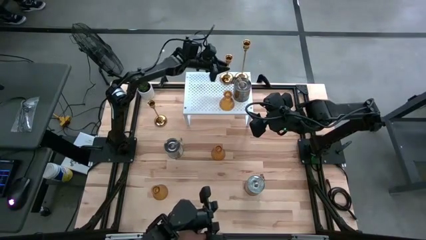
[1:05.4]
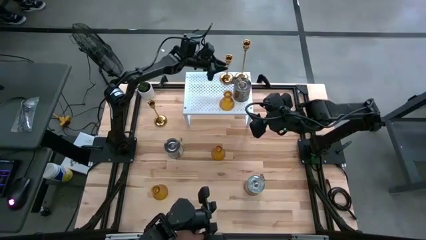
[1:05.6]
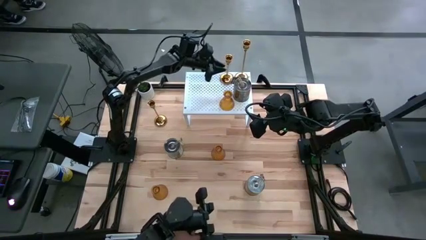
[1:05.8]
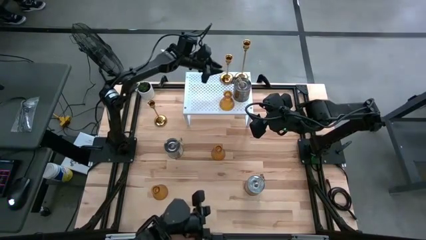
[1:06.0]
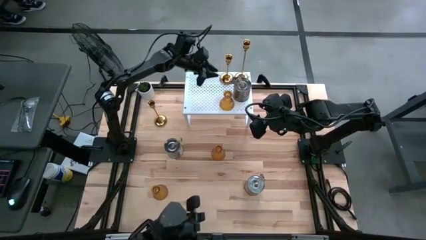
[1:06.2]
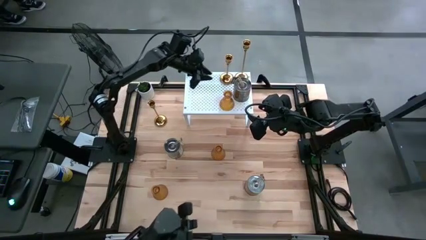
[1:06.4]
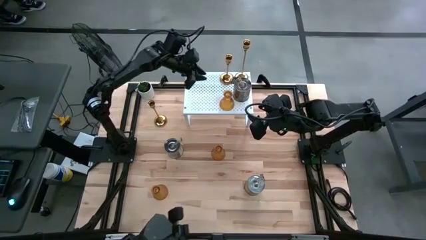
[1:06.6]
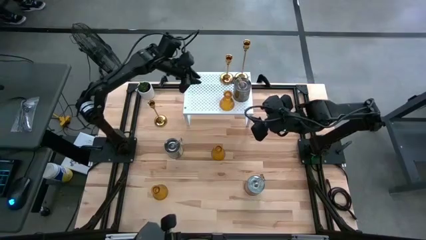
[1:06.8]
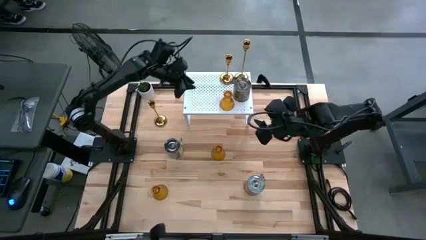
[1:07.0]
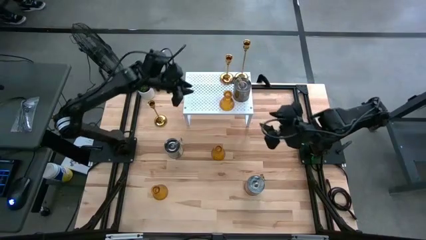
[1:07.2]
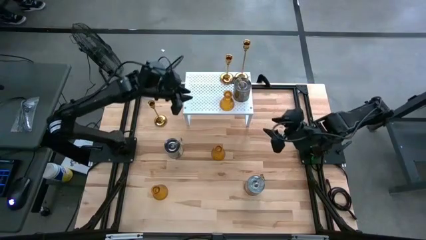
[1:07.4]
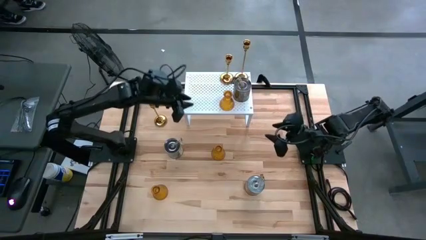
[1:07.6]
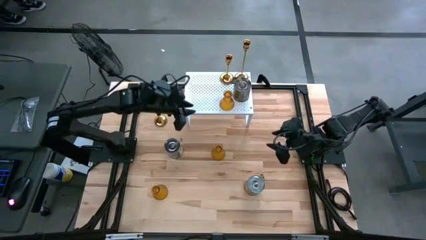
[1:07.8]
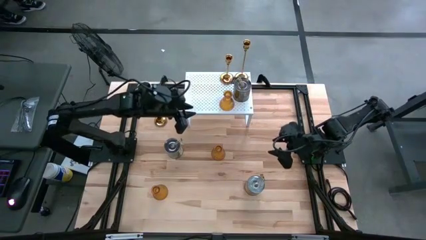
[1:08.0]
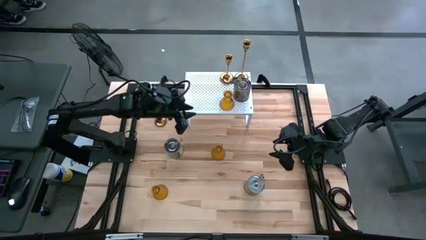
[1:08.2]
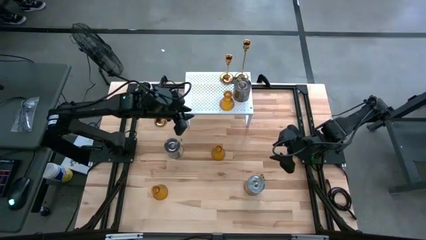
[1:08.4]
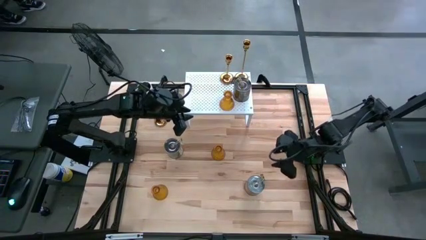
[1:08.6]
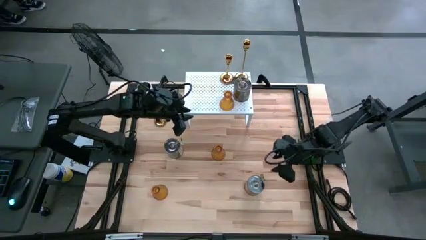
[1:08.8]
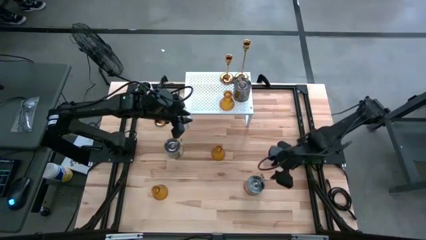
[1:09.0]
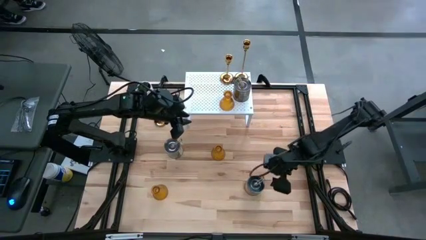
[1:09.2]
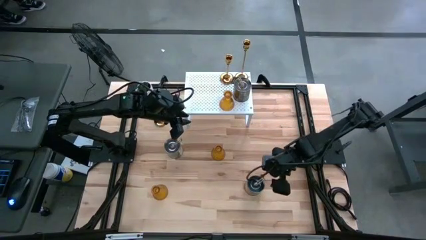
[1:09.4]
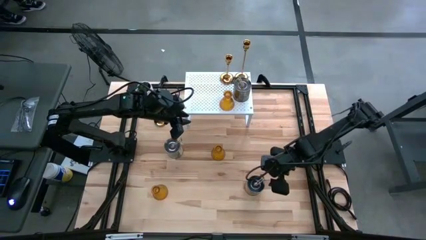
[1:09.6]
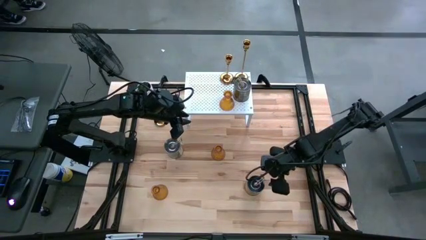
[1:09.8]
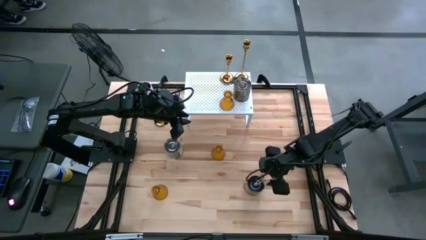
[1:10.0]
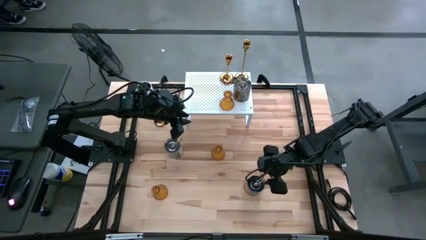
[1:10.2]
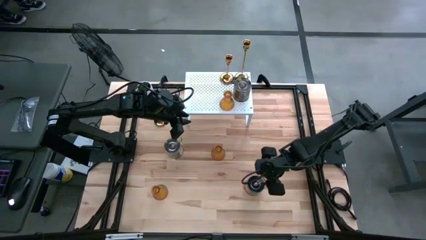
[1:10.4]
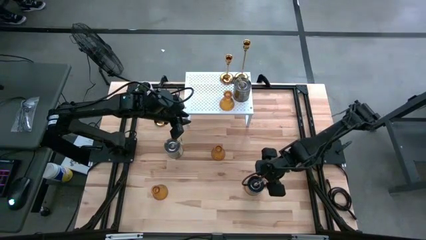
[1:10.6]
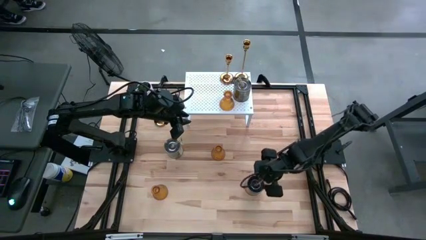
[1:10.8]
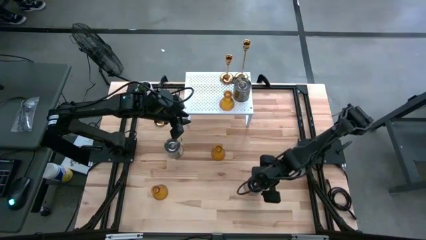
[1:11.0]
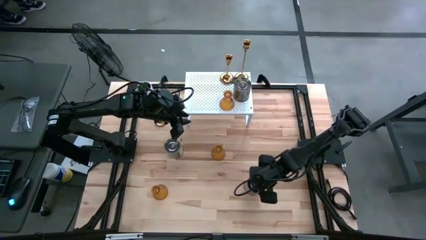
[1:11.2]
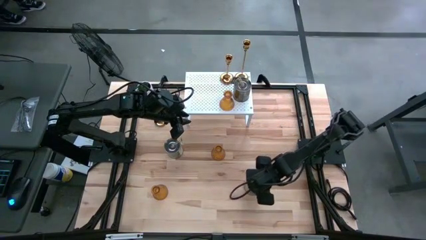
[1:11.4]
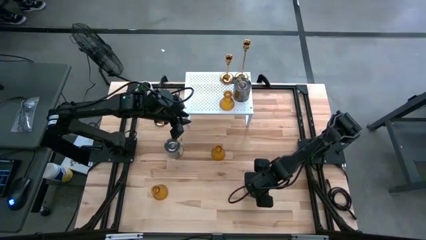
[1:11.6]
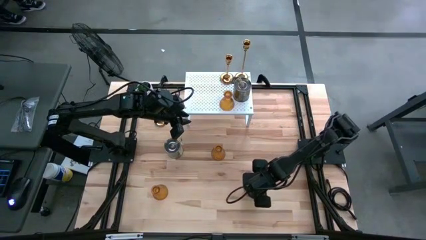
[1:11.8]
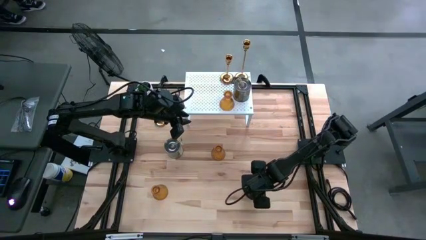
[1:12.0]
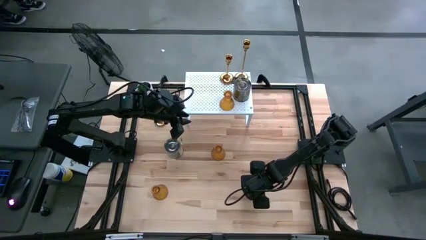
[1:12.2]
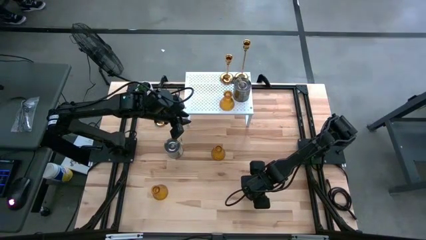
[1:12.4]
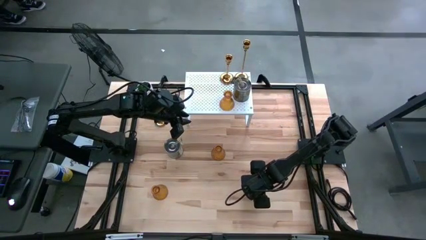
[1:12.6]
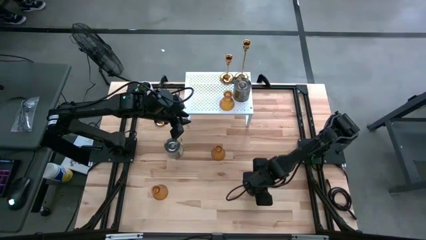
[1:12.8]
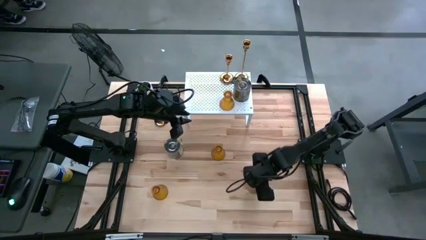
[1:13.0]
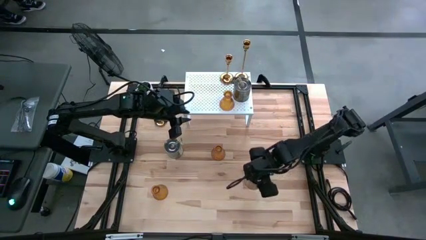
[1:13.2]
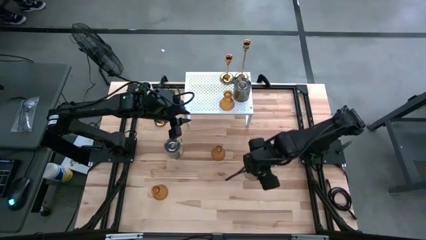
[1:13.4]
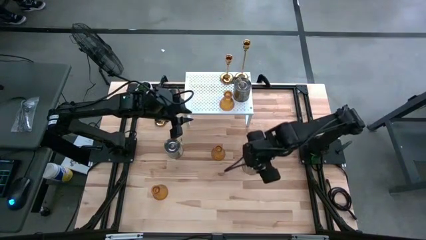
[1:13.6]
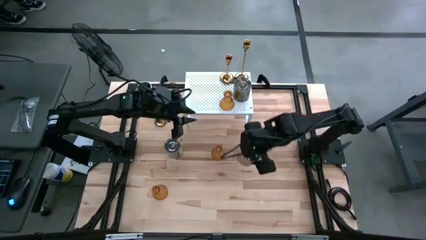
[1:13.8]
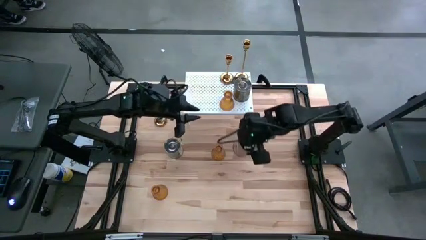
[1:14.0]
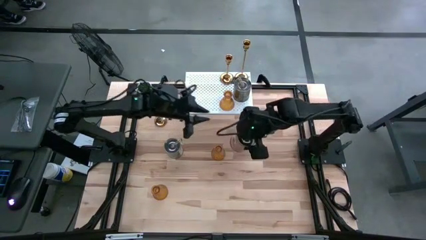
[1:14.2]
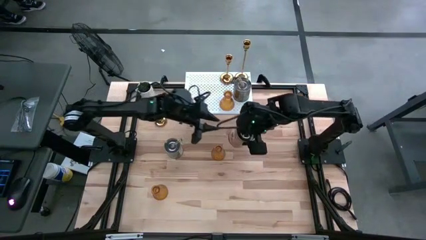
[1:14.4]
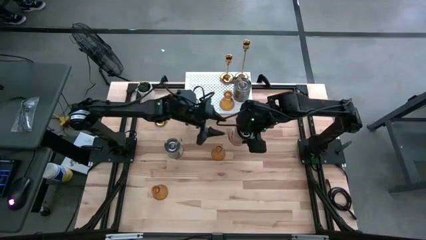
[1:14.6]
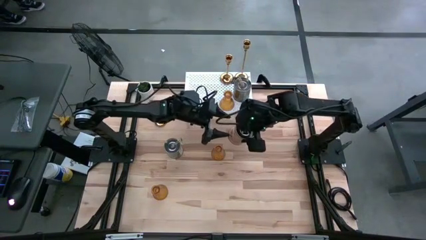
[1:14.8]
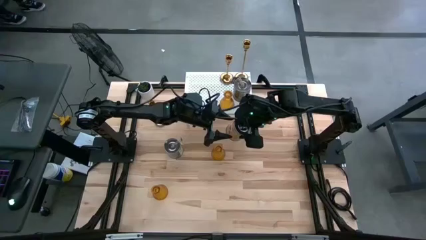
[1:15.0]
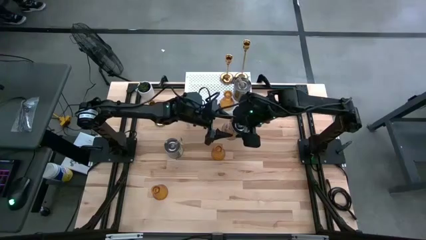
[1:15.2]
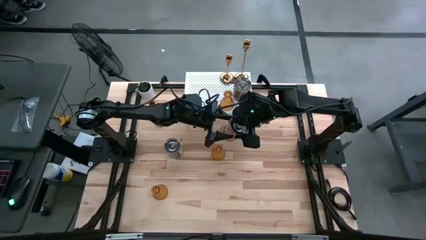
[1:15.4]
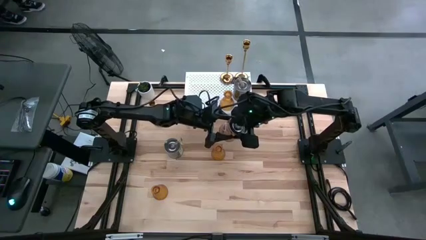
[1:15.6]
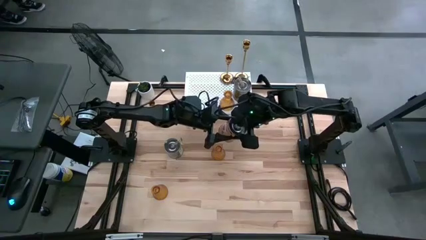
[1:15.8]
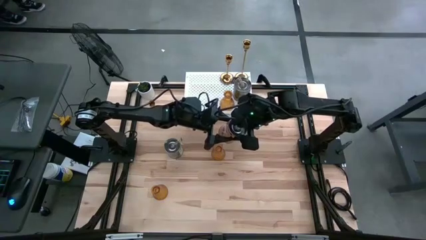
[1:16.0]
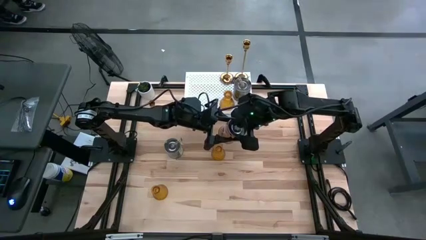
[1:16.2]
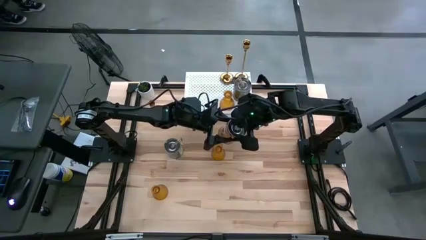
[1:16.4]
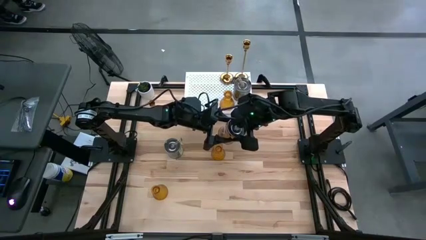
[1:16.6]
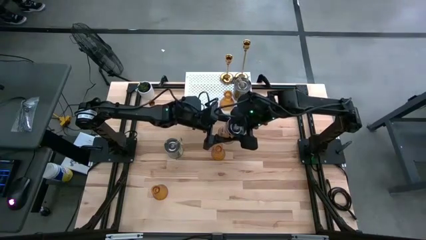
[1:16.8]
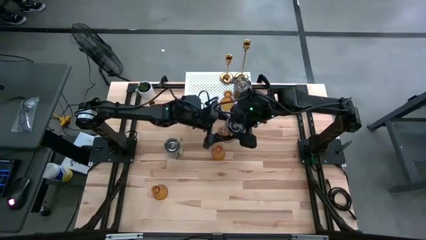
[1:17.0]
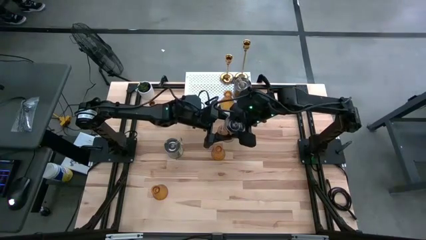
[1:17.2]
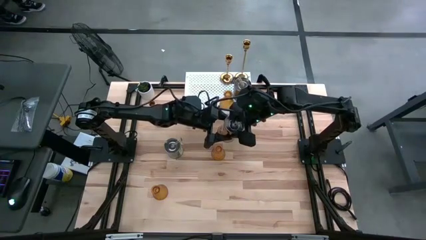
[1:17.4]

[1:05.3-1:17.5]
Task: Pick & Place candle stick holders
Put the orange and silver scented candle on the shelf

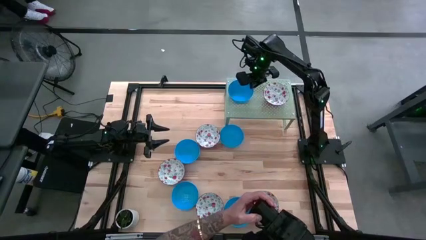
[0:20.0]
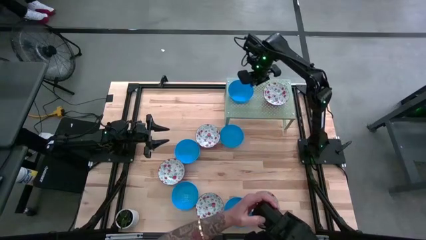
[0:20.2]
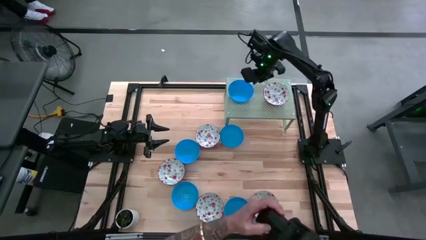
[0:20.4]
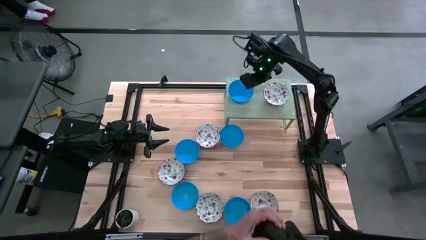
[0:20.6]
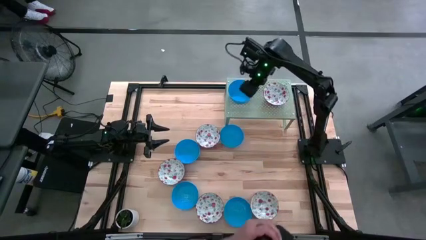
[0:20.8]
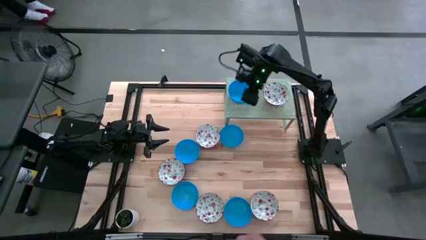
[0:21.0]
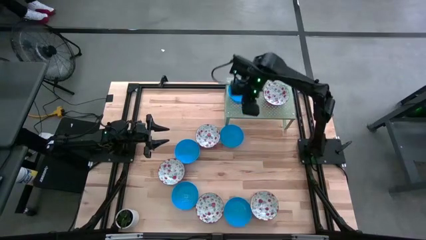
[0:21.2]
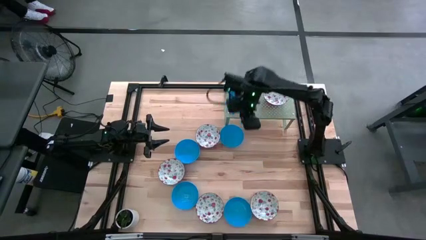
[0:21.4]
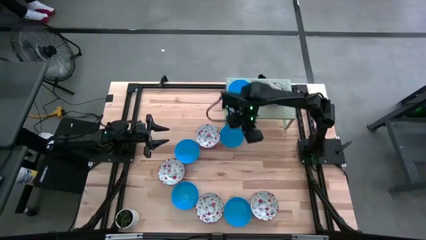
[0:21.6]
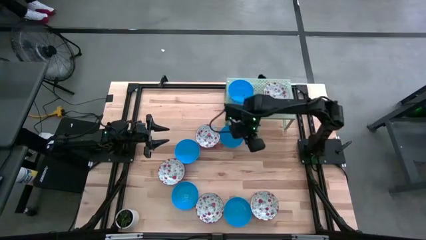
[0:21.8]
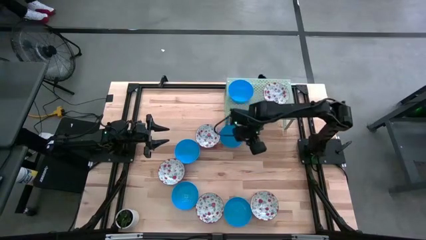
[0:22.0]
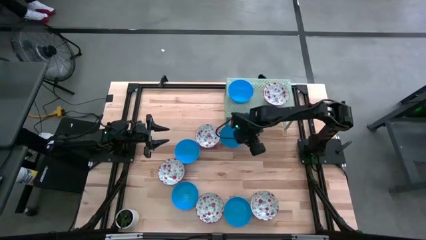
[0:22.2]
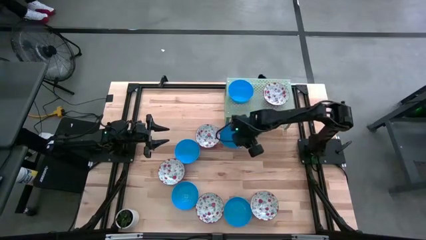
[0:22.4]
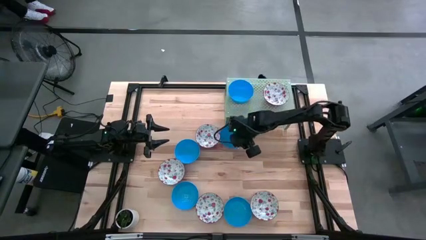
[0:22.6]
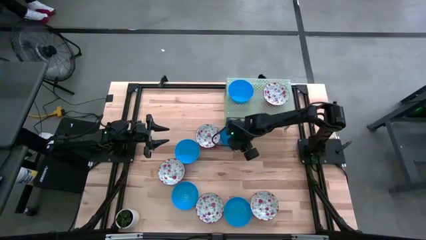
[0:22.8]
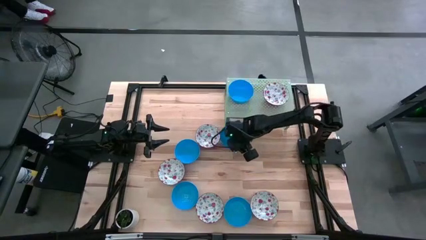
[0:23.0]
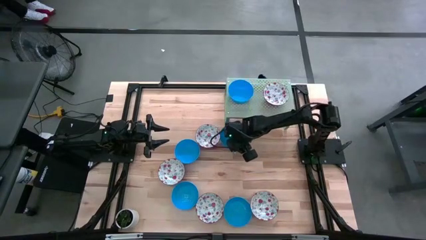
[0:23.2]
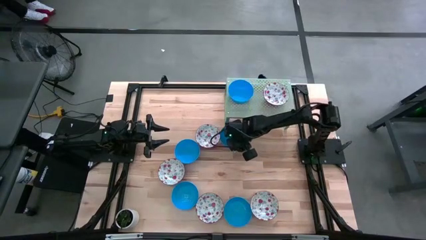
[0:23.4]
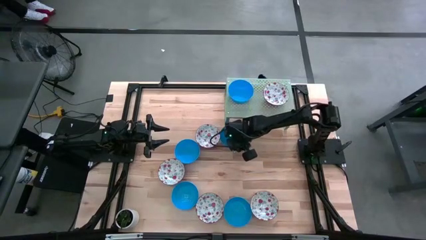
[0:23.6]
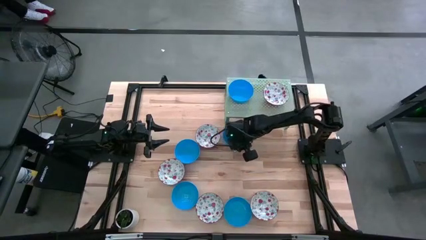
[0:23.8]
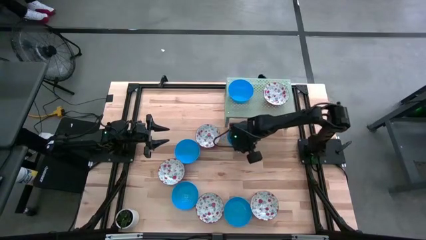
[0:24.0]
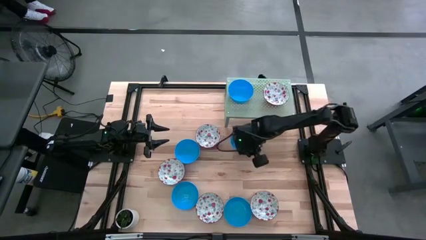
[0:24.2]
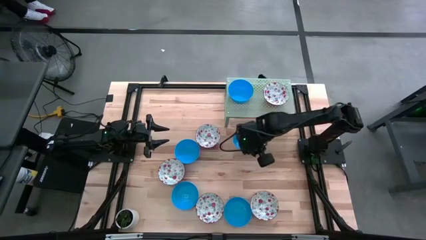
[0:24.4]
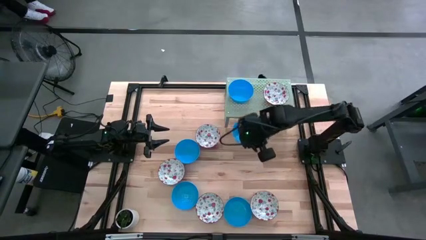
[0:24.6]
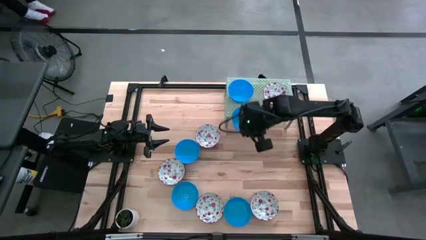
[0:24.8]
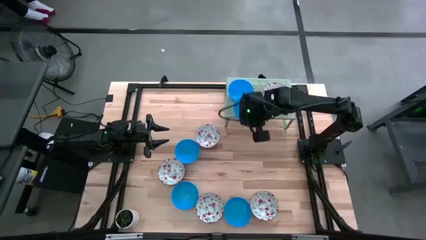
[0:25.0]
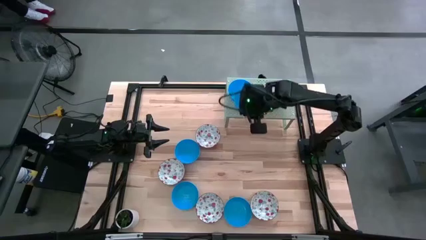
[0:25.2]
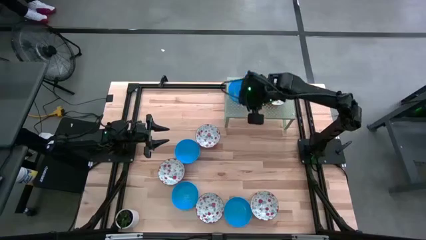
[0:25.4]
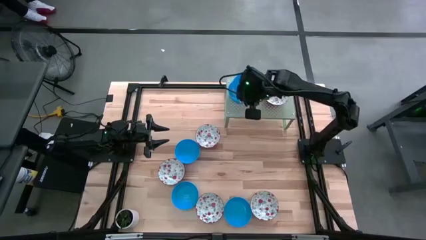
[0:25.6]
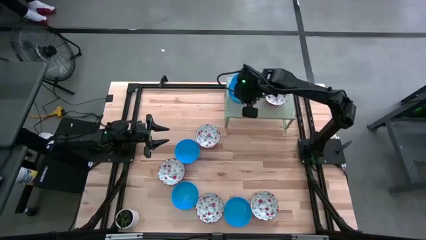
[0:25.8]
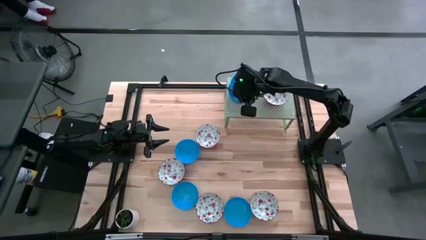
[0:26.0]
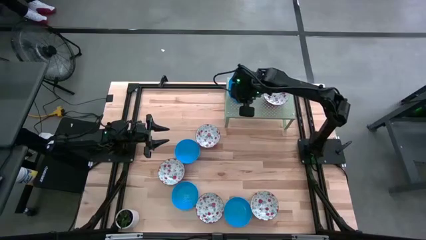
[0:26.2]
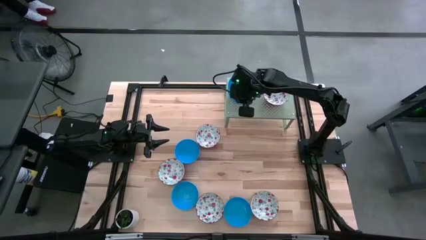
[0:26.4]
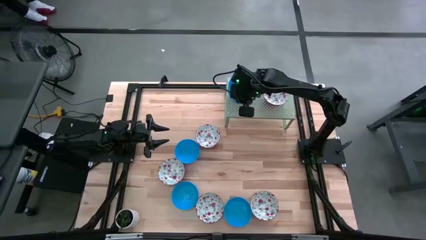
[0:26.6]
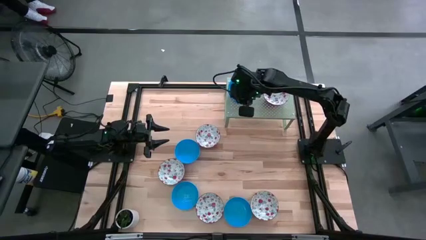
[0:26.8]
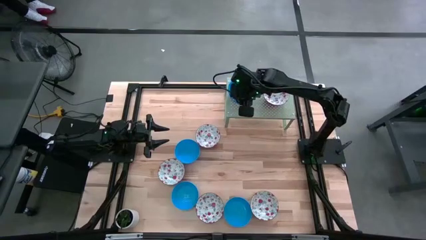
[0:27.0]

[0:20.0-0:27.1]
Task: Pick & Place Mini bowls
Stack the blue bowl on the blue bowl on the shelf
